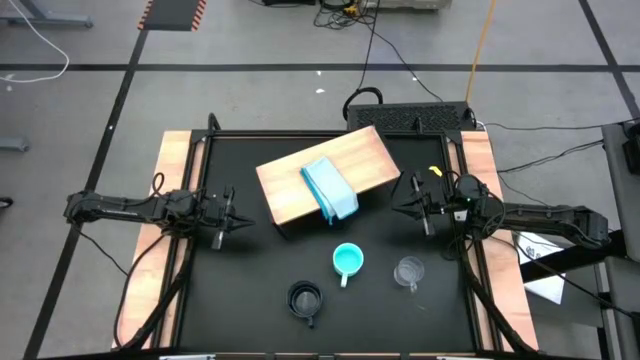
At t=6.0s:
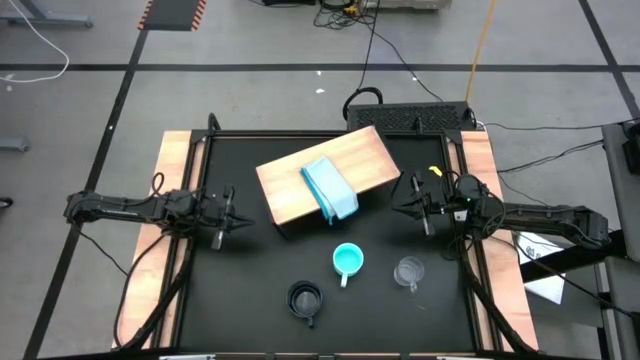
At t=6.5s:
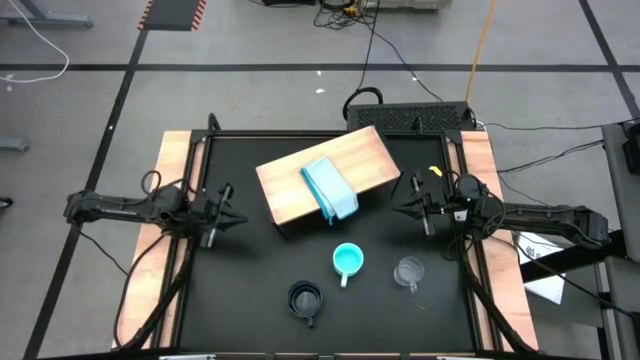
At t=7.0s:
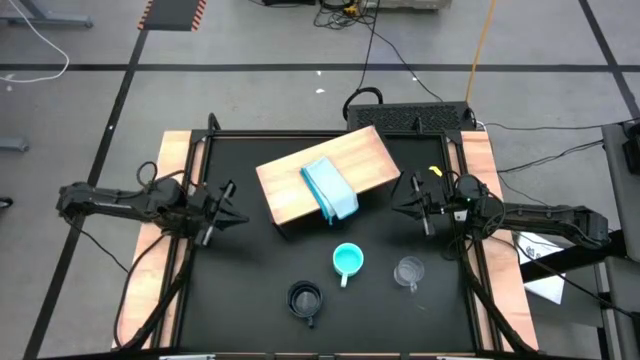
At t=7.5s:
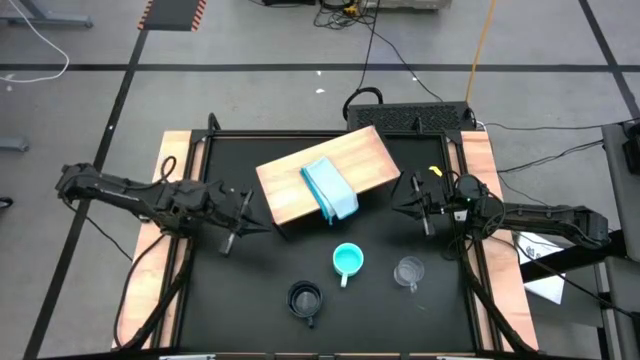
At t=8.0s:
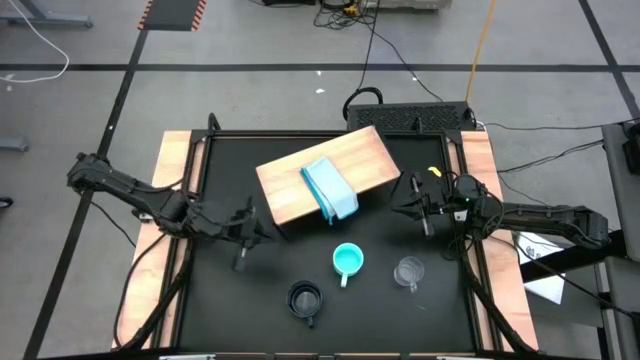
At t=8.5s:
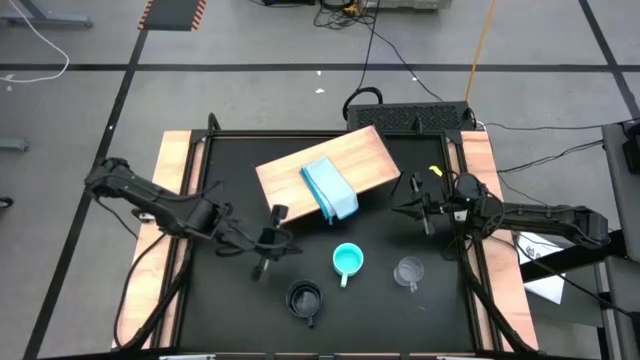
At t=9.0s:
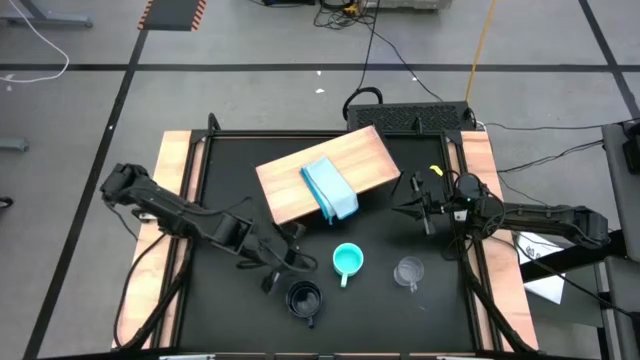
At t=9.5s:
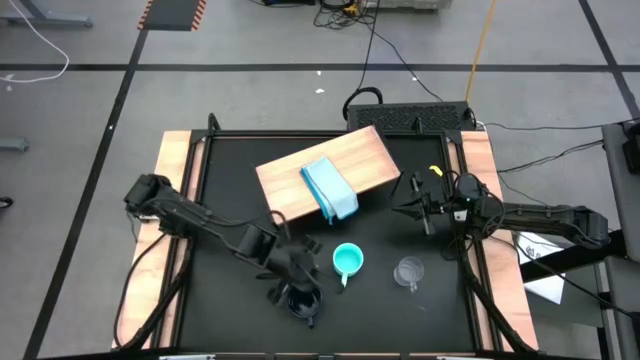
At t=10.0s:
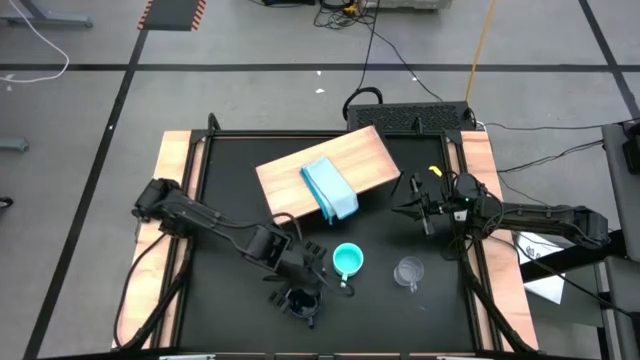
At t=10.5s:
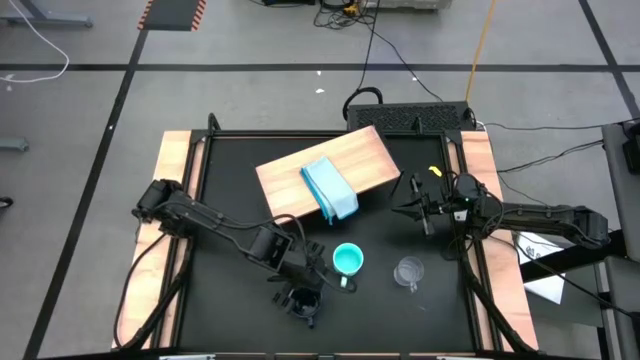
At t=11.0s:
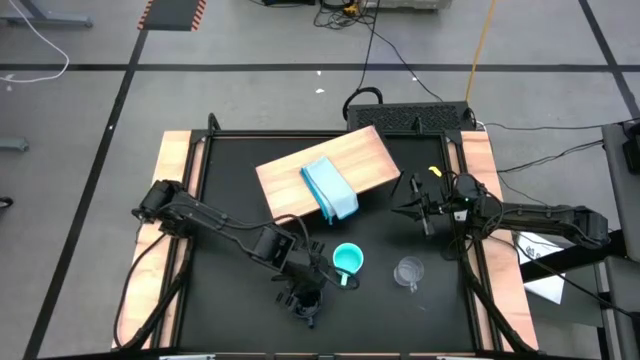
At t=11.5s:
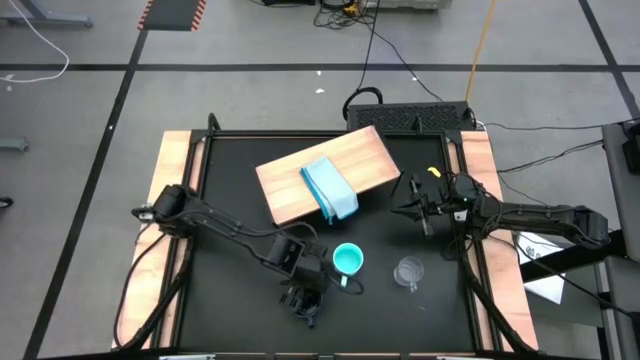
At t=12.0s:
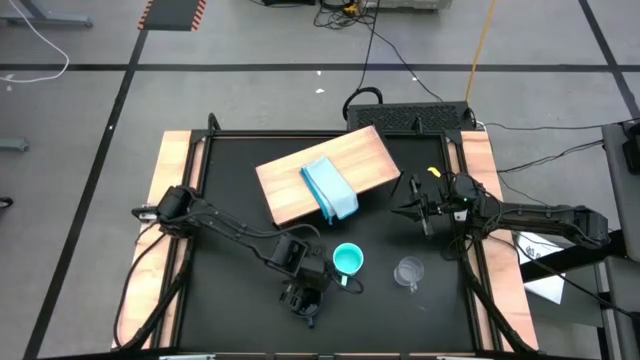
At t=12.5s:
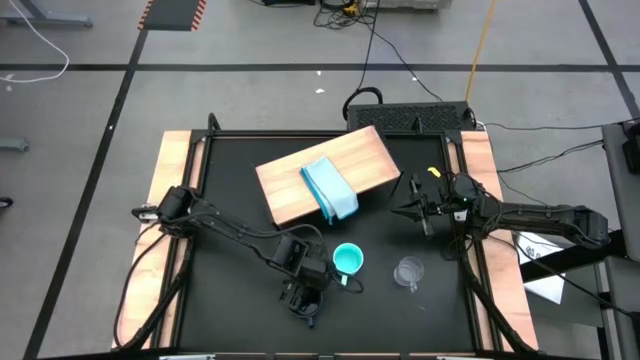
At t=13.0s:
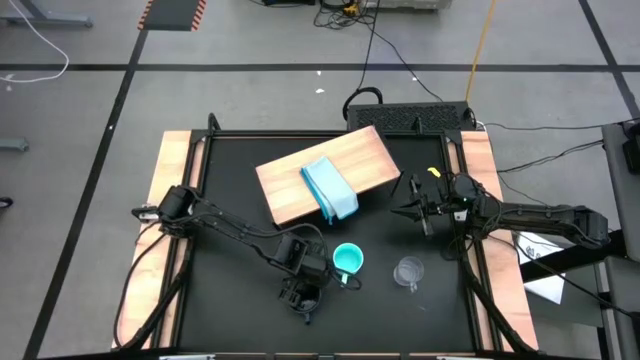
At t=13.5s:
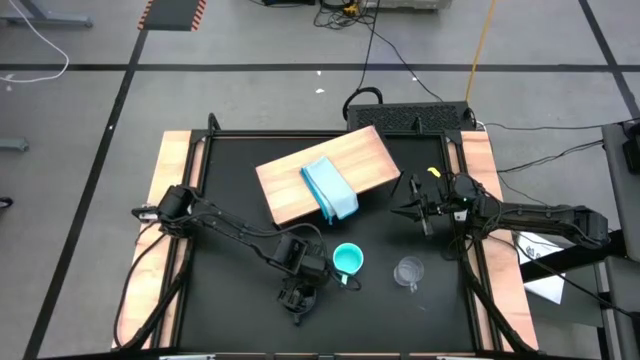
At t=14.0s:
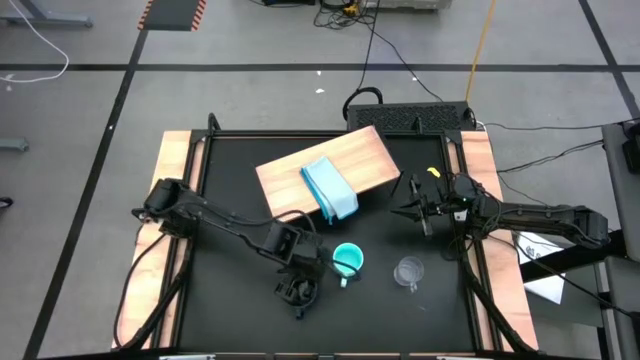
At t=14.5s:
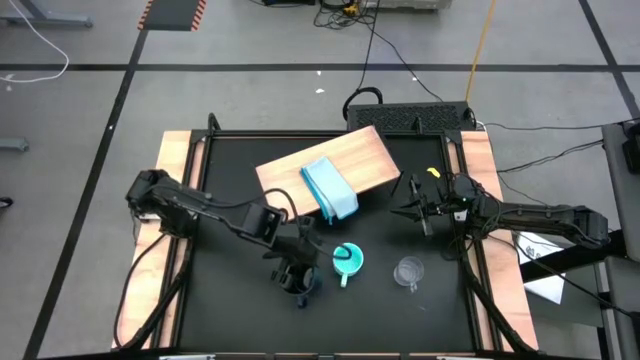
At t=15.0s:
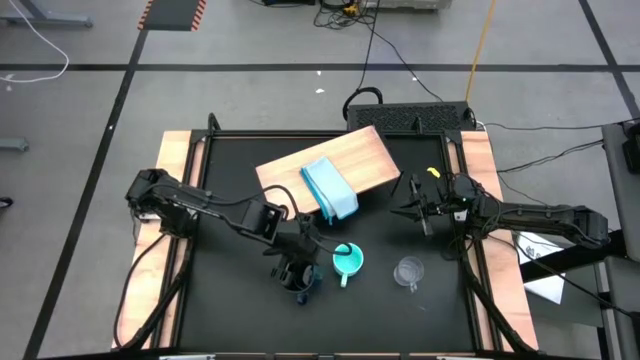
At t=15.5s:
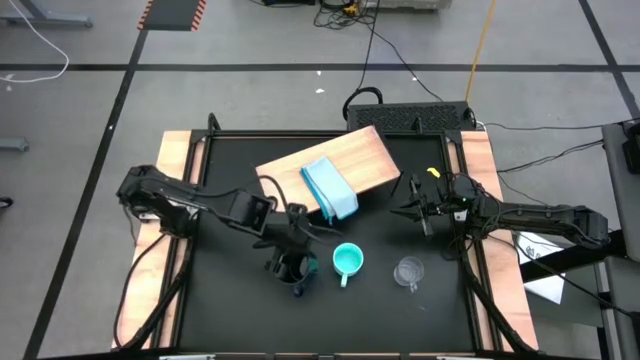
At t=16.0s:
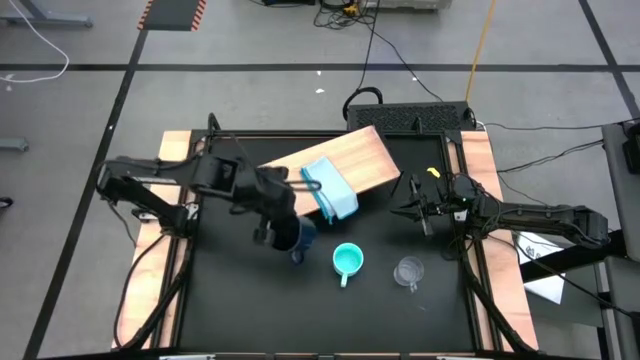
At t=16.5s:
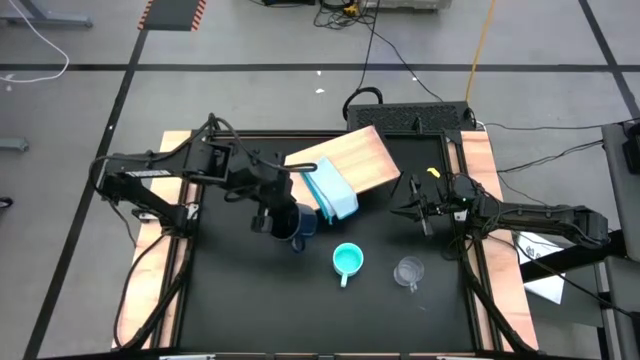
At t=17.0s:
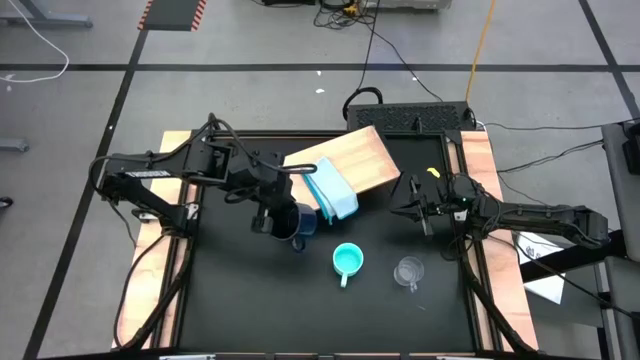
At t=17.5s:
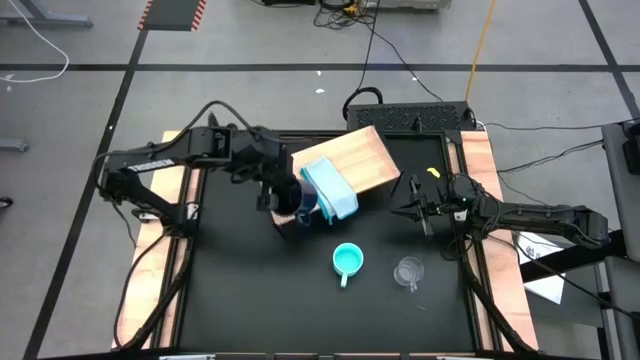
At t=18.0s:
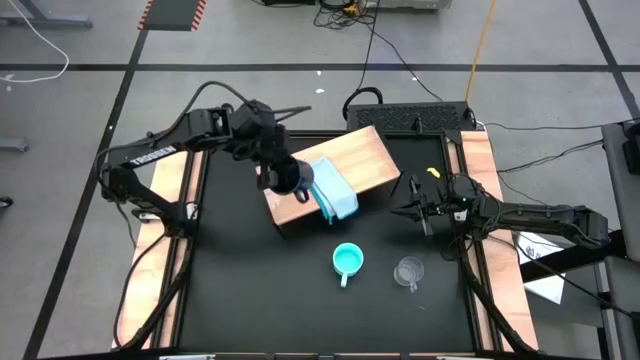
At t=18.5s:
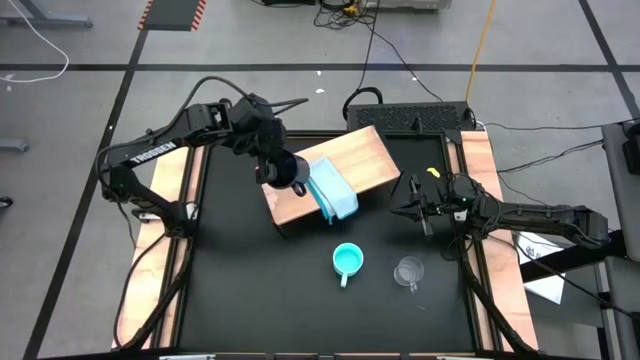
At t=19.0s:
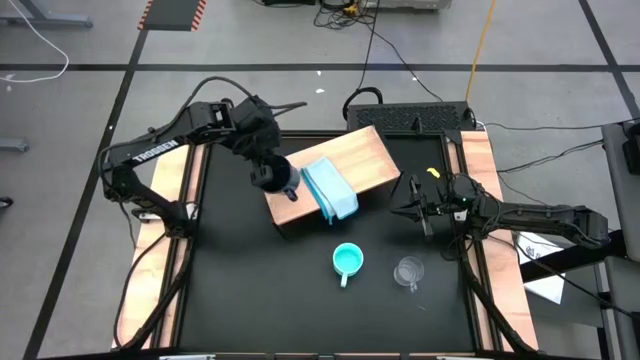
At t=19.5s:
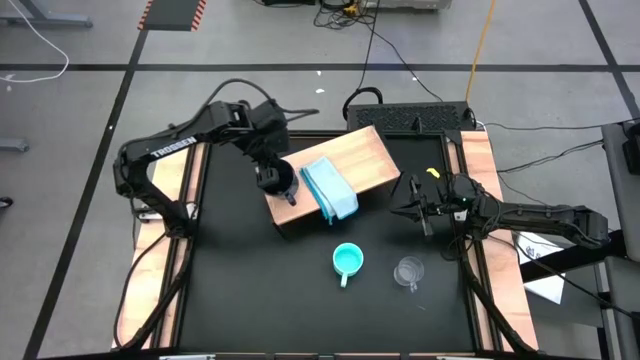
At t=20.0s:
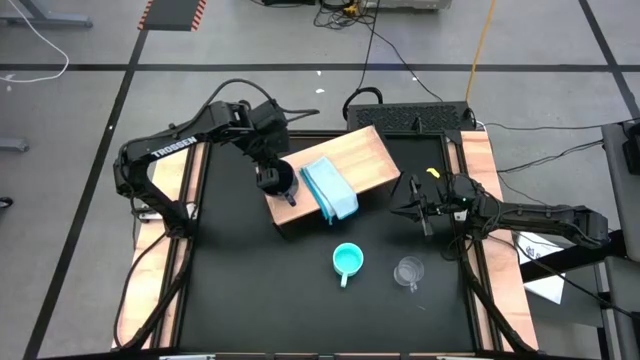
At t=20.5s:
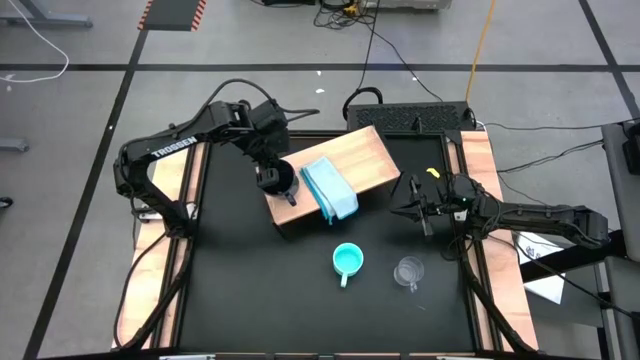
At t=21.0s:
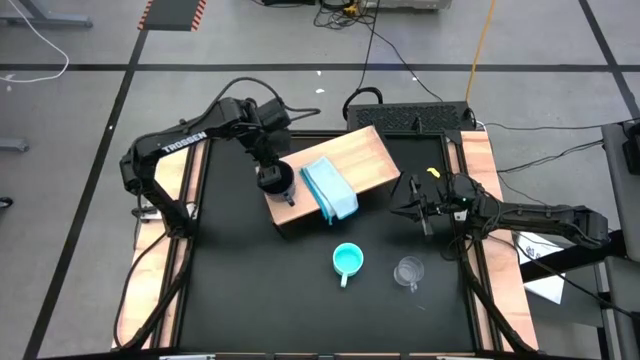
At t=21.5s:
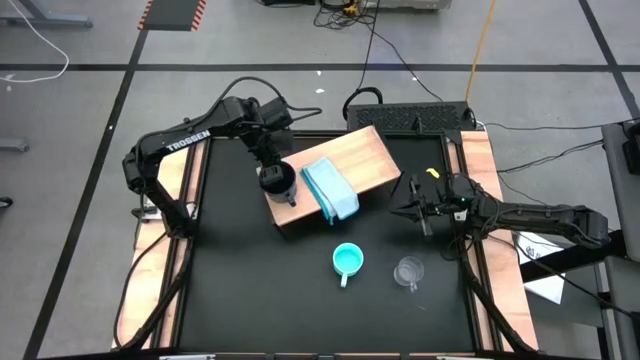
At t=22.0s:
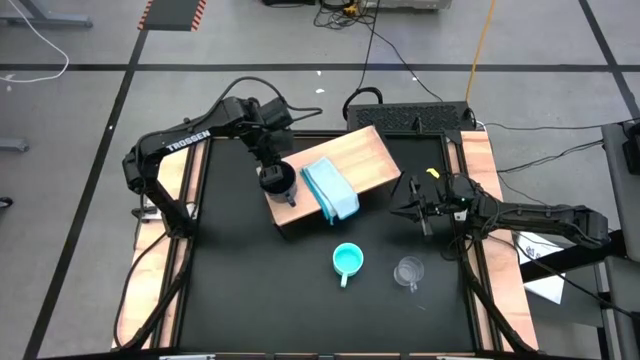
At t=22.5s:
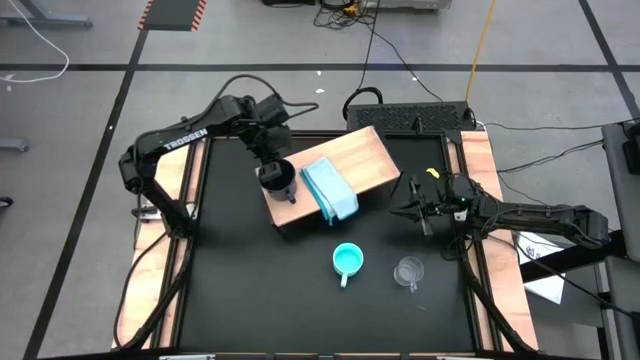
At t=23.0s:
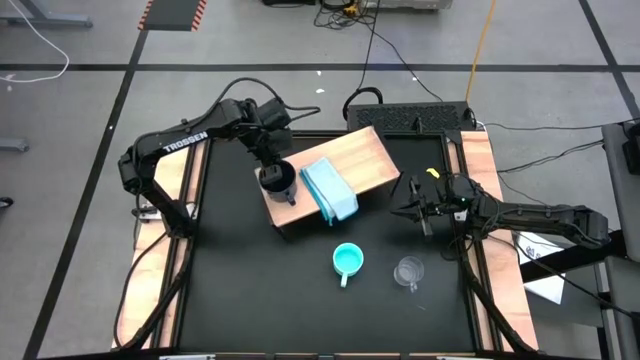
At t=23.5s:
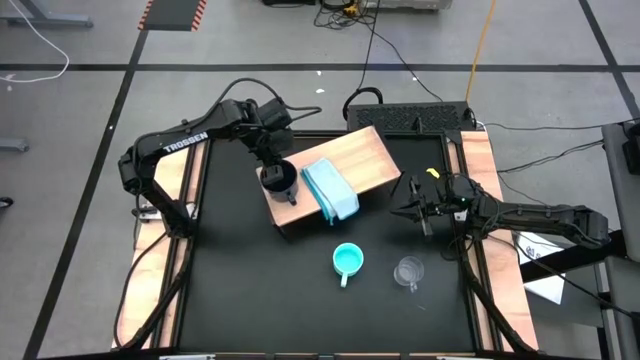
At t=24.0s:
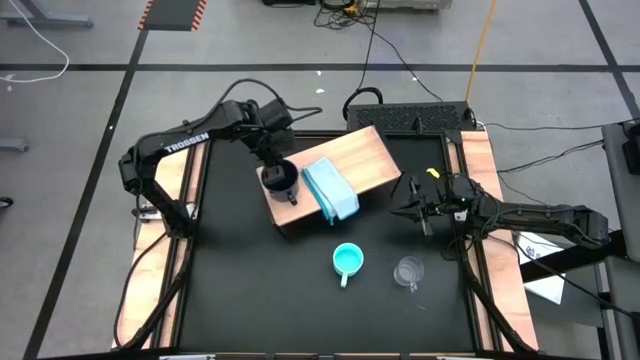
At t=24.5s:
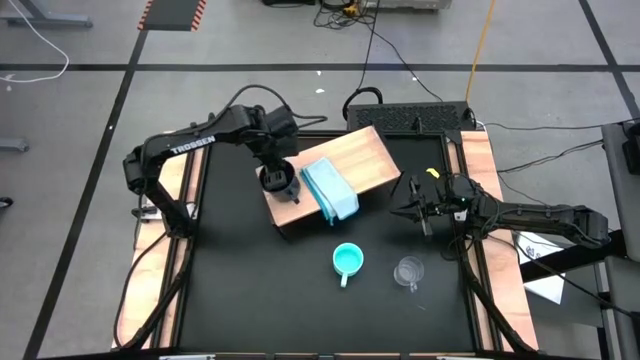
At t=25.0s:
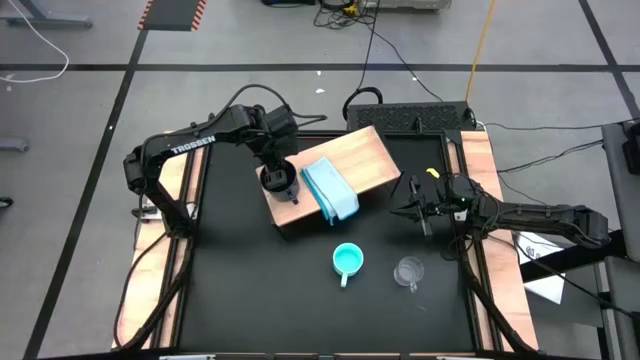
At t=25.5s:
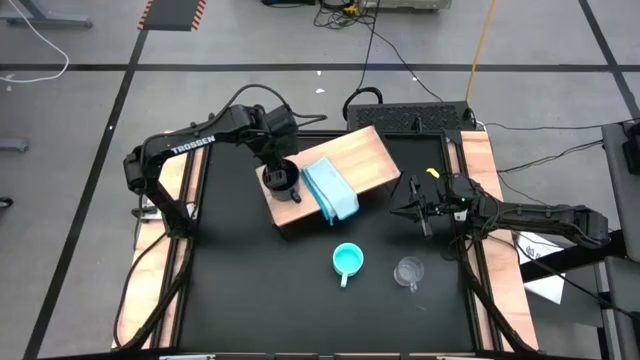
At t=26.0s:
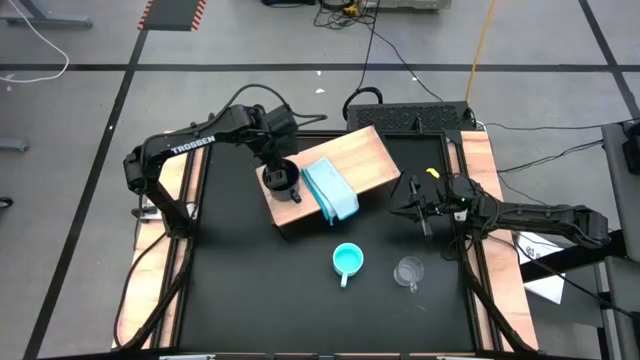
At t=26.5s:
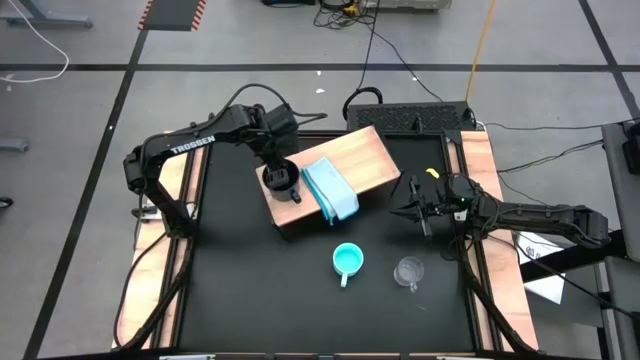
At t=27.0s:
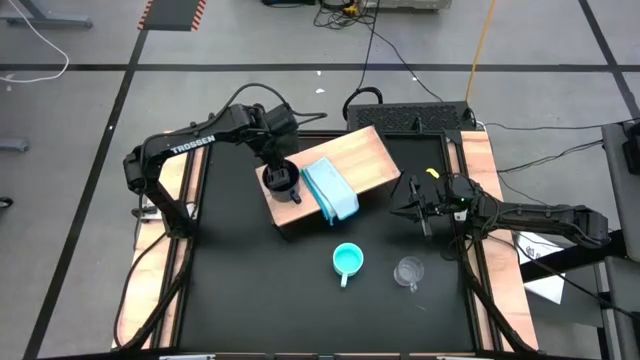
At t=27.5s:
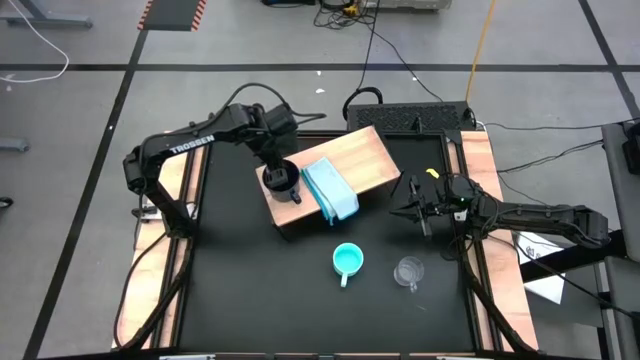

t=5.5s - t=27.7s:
Task: Stack small to large cups/mugs on shelf
Put the dark blue mug to the left on the shelf
